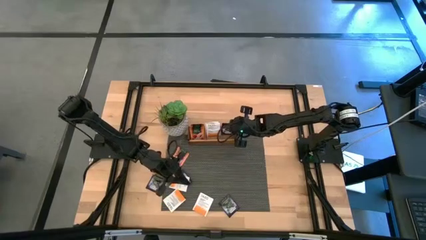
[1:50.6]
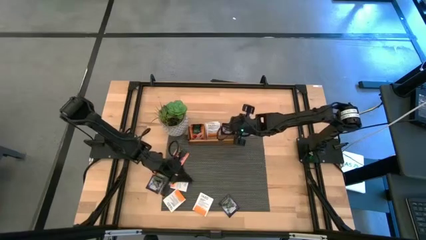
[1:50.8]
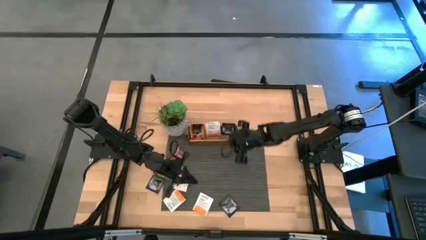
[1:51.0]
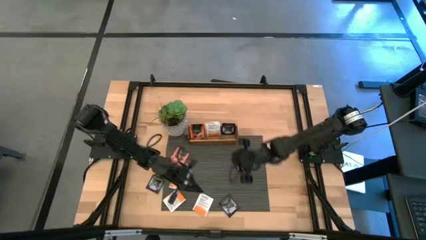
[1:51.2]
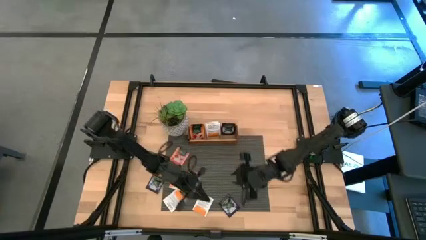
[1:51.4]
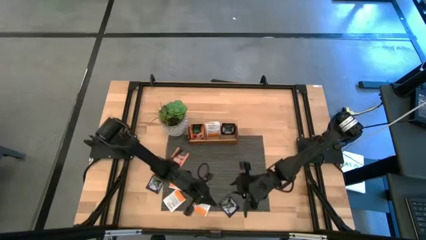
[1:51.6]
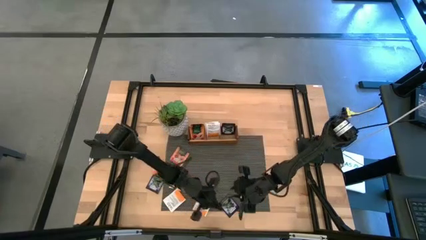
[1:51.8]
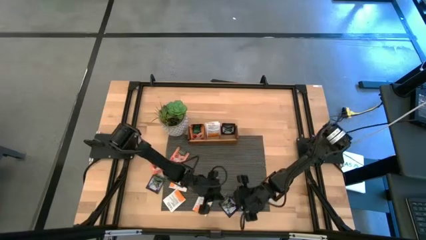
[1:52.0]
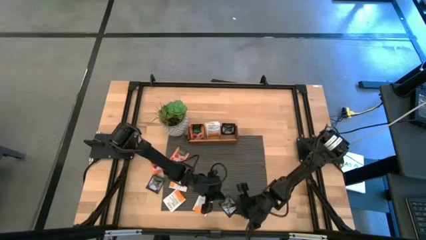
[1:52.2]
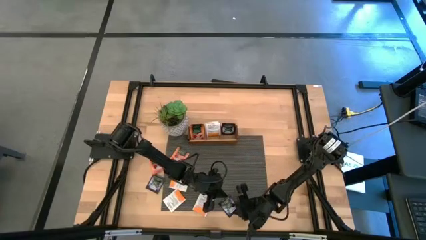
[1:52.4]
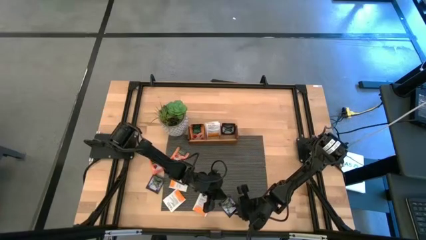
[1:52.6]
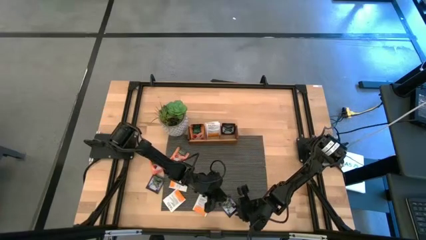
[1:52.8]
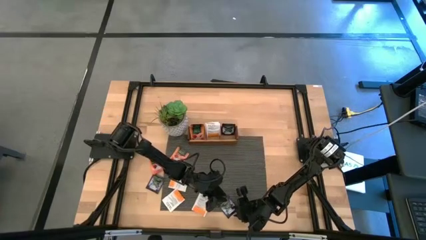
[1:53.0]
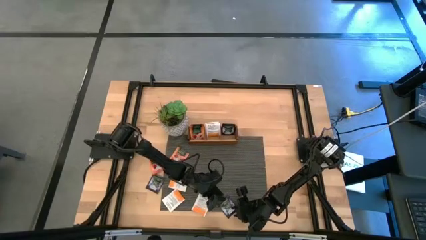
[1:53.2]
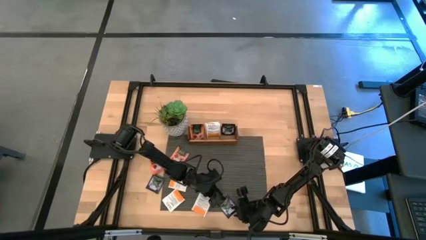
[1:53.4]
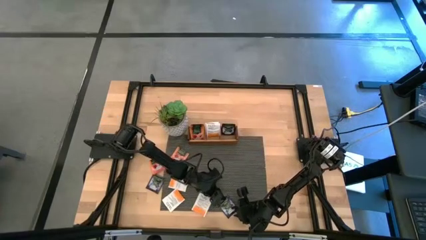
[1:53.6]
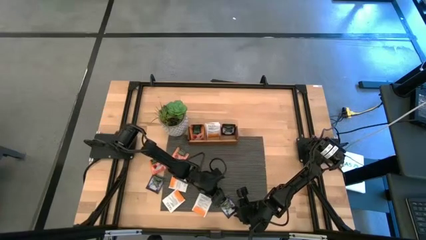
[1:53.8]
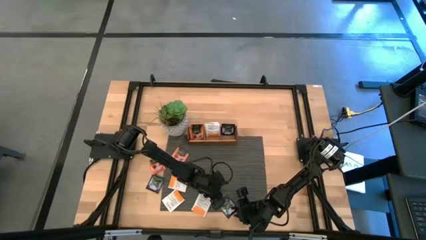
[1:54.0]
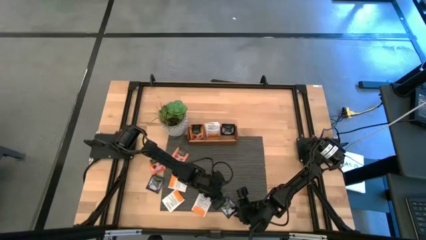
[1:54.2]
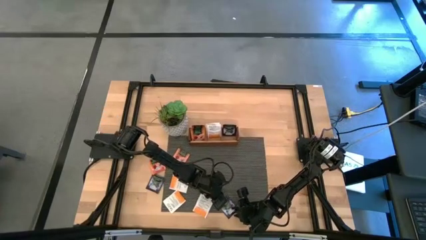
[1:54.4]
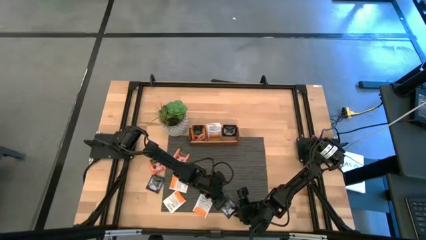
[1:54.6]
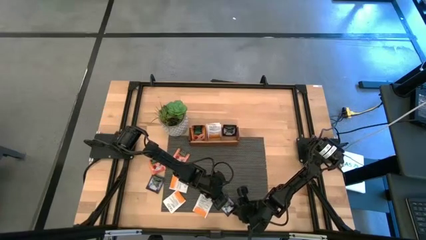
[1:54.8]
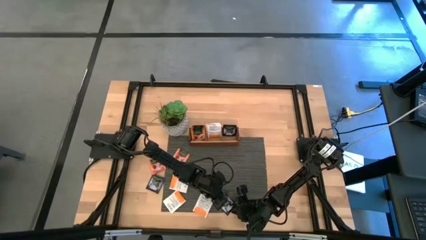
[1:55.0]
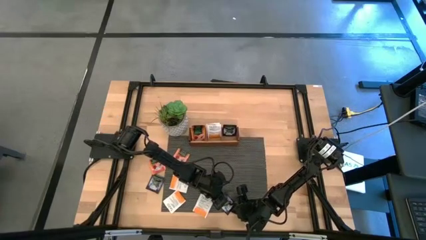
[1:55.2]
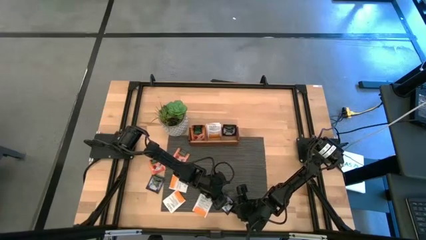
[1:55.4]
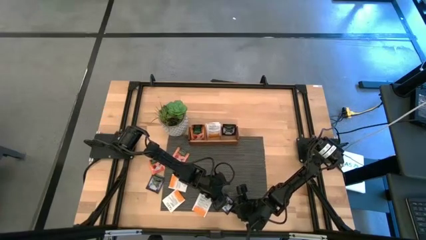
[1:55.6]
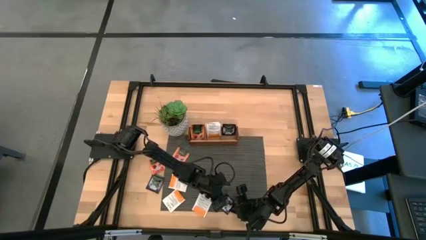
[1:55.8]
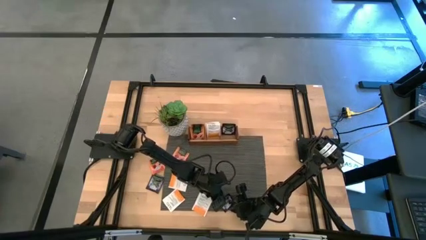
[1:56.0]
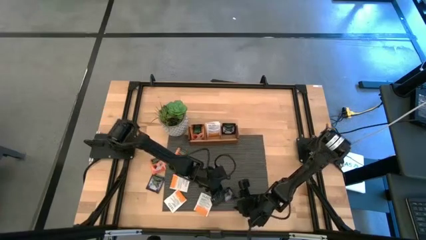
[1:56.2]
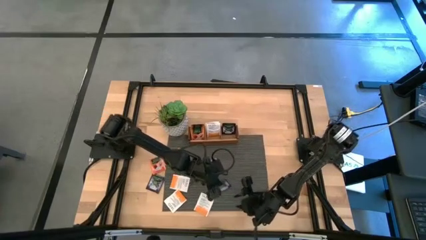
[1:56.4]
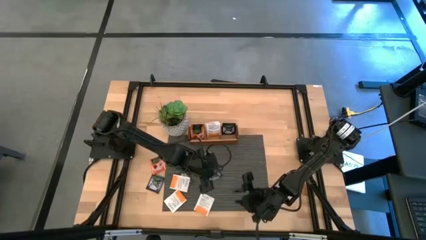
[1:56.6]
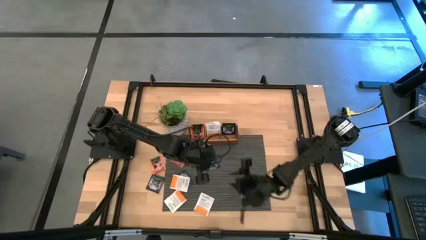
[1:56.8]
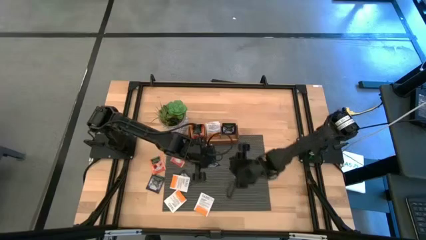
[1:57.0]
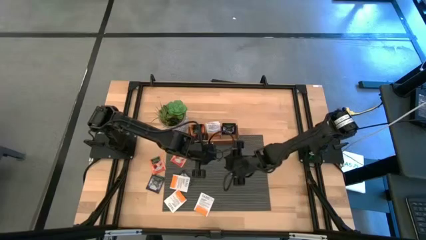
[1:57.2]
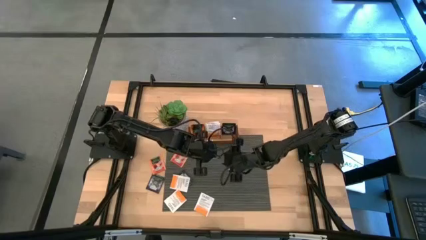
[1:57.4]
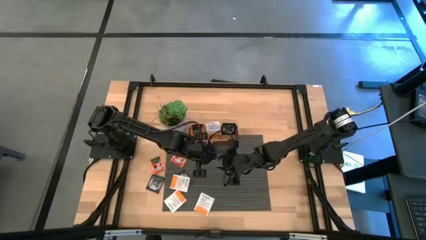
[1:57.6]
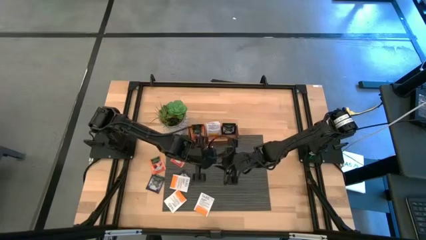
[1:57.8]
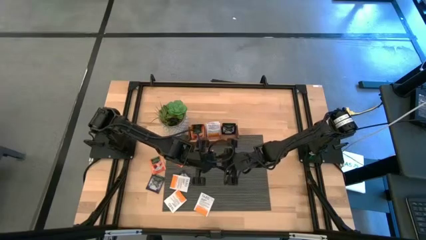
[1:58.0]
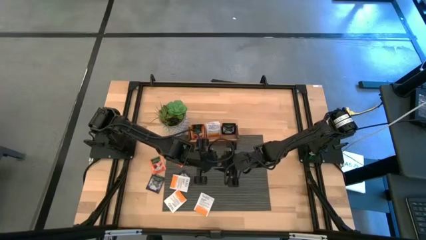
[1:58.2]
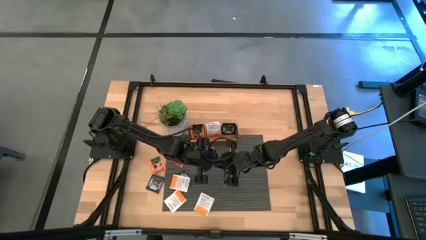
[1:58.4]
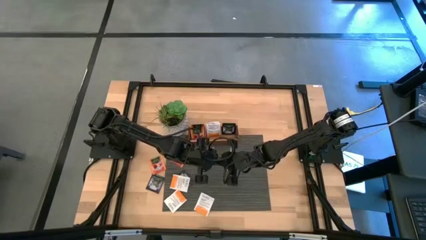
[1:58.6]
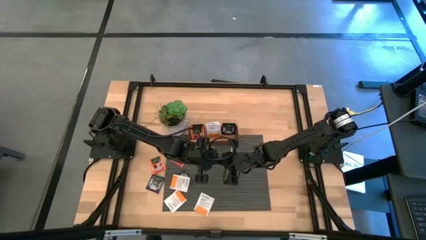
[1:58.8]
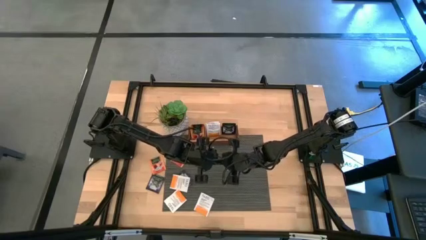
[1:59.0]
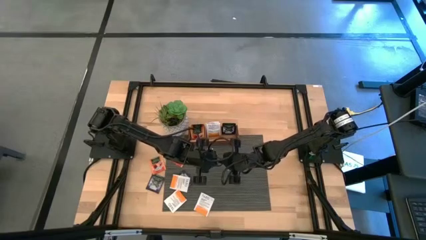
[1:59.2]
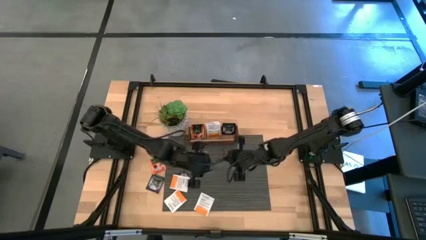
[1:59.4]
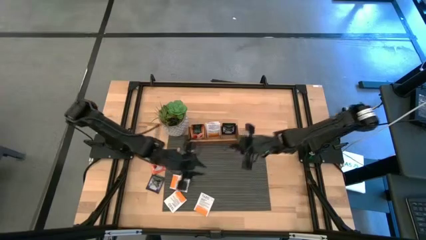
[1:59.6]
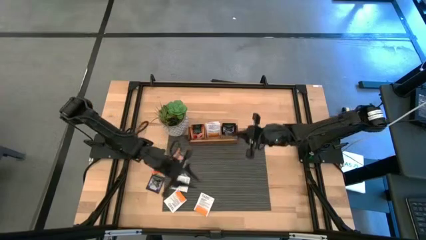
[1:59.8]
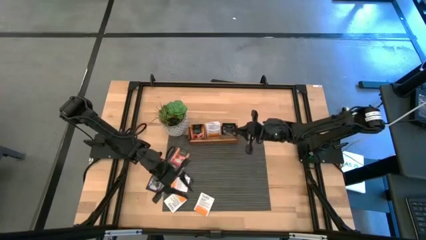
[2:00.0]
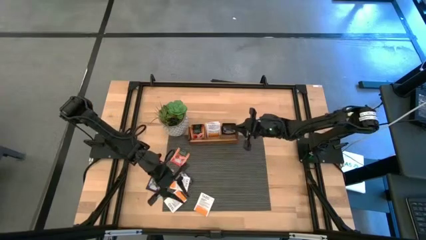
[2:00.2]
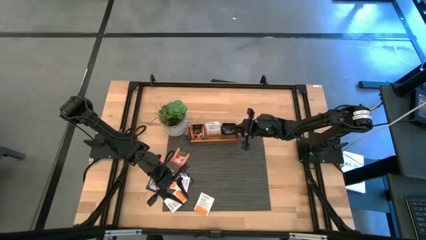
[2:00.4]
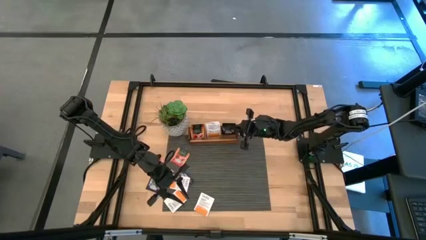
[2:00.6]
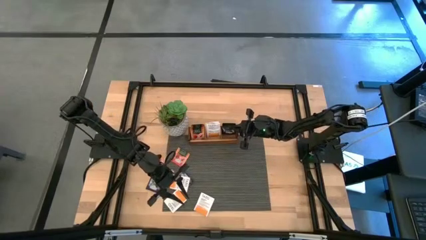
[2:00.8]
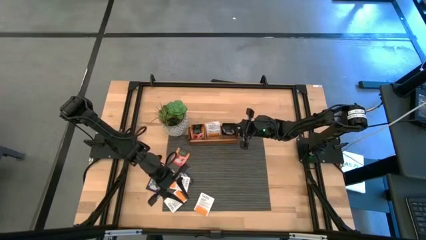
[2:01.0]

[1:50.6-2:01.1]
Task: Pick & Place Tea
Put the right black tea bag into the right slot of the wooden organizer

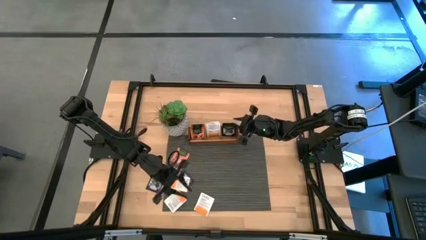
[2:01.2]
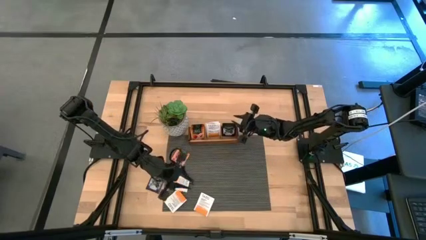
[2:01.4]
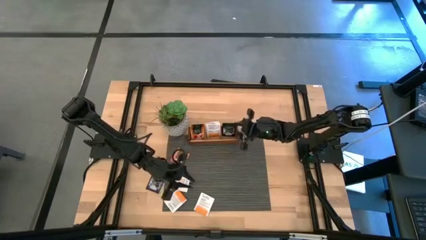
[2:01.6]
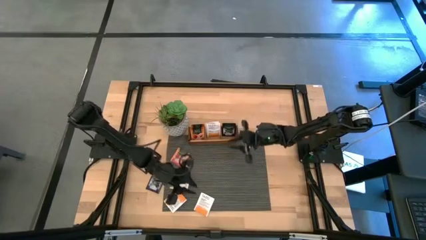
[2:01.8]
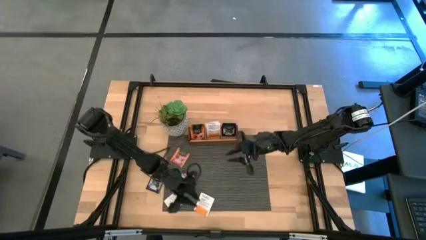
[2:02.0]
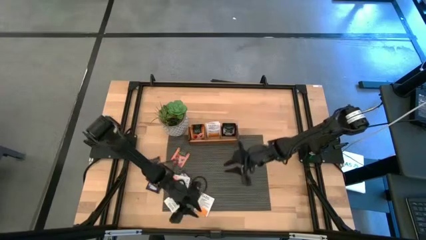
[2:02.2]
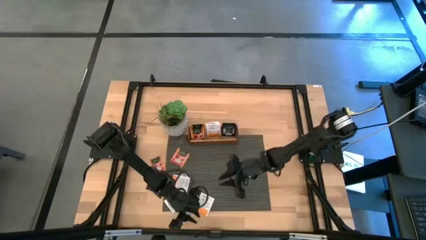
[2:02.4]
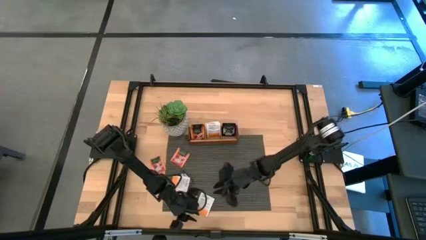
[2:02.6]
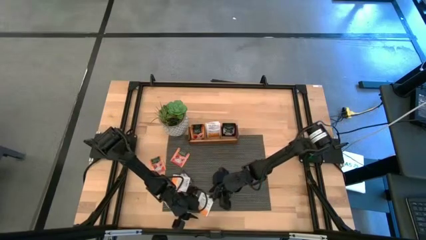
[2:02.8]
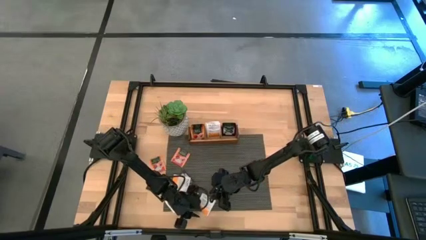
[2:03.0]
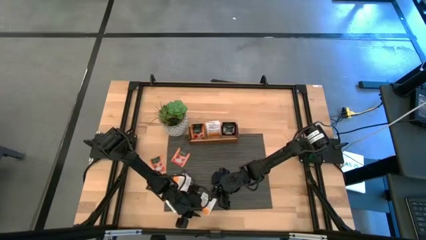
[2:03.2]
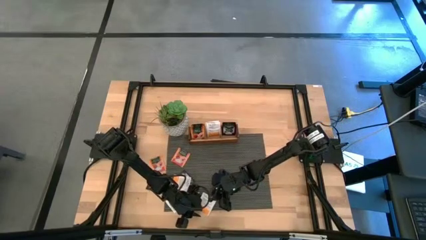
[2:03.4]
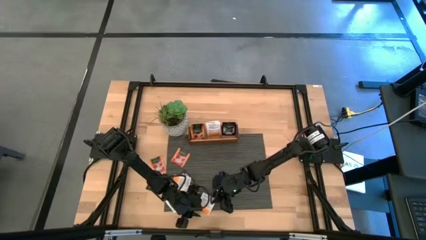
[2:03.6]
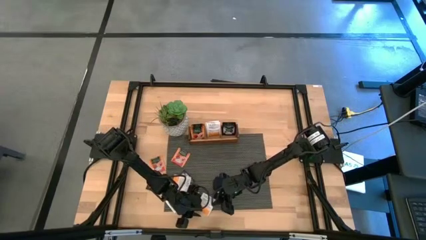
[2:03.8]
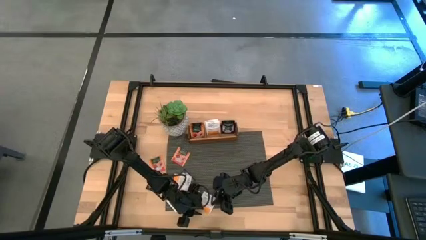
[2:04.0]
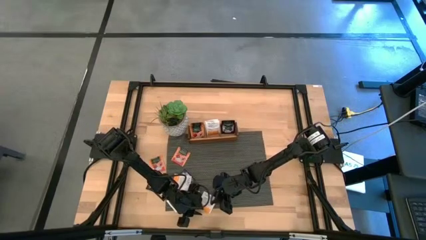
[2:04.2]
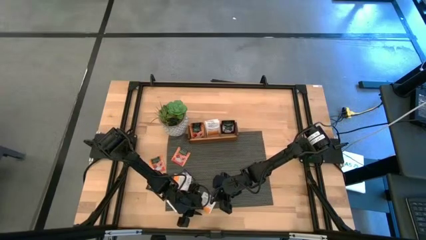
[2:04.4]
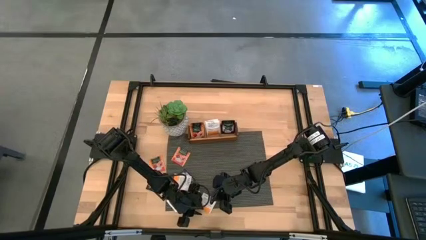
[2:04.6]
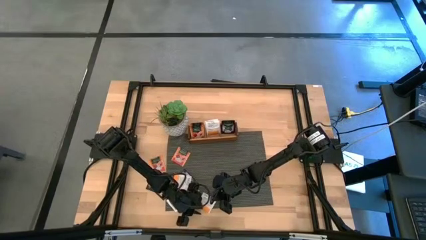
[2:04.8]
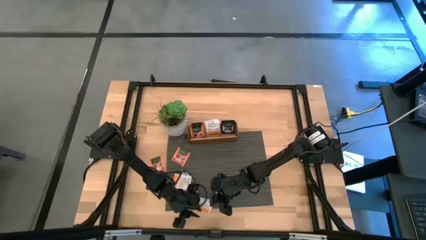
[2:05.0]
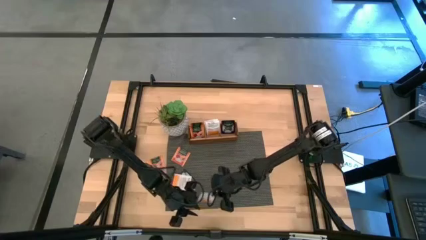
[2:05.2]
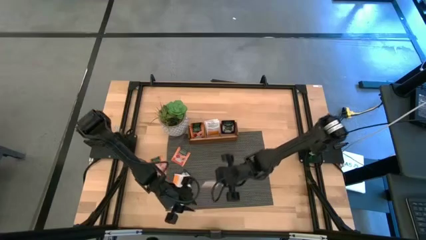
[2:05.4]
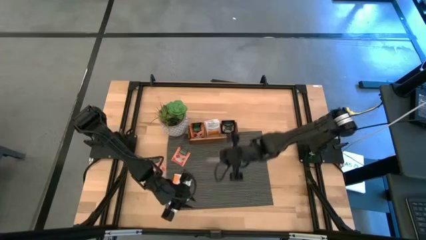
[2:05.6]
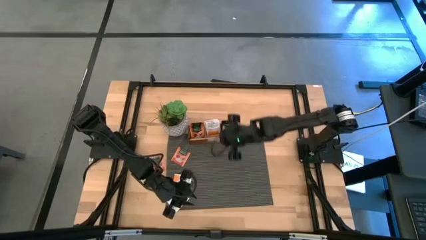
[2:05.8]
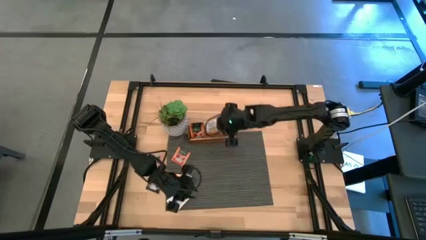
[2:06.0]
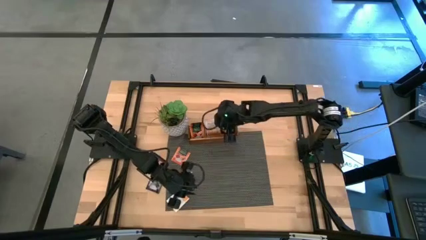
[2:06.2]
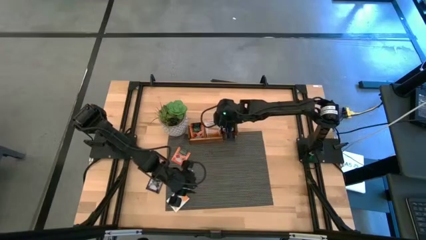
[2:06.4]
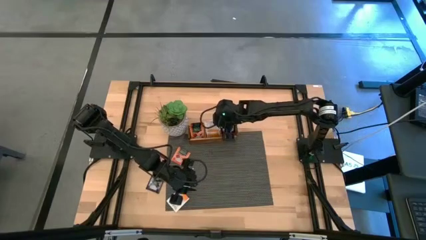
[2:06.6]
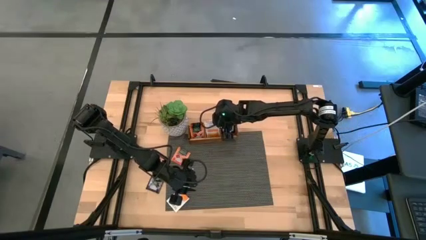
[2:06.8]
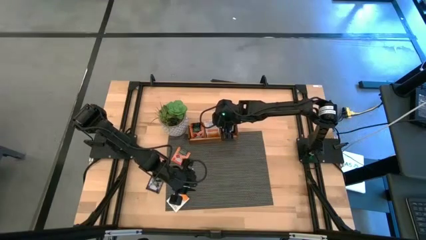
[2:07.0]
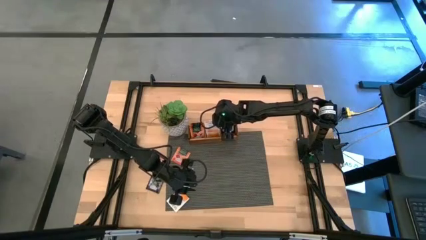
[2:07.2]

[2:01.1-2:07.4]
Put the right white tea bag into the middle slot of the wooden organizer

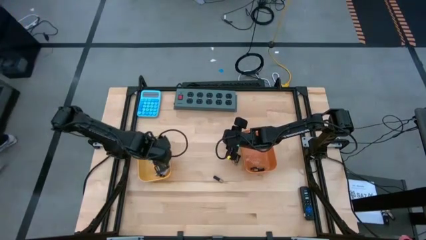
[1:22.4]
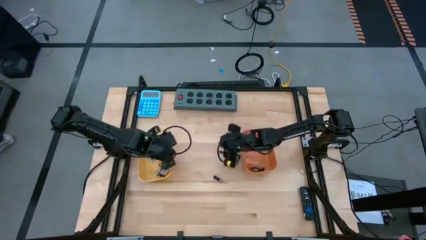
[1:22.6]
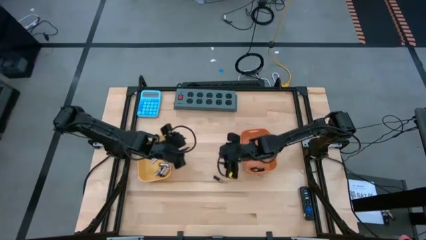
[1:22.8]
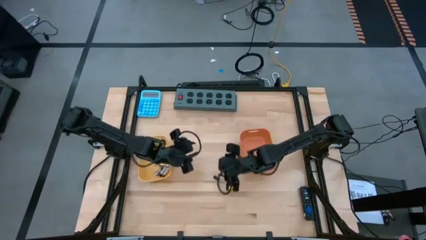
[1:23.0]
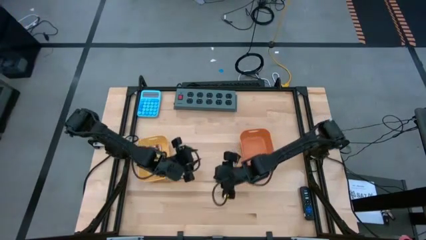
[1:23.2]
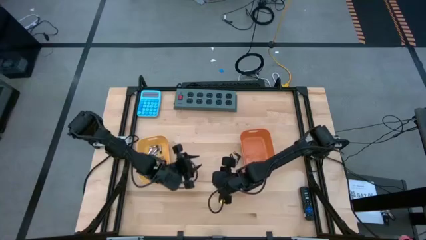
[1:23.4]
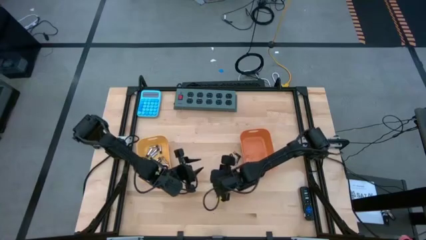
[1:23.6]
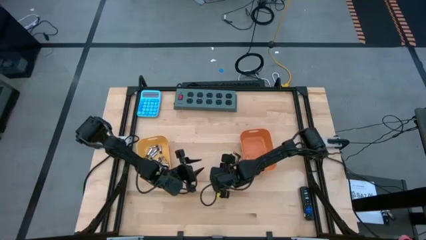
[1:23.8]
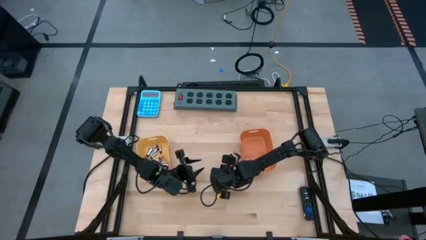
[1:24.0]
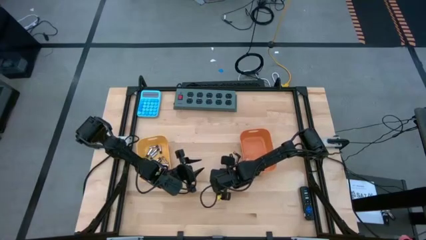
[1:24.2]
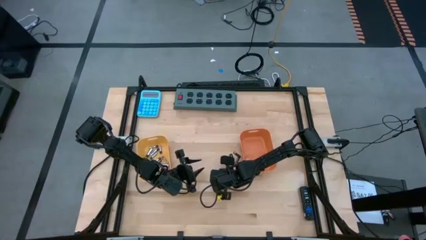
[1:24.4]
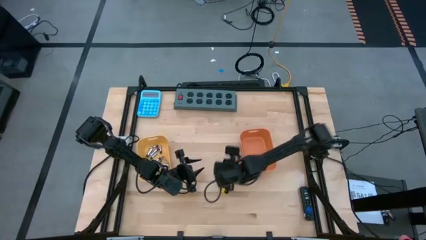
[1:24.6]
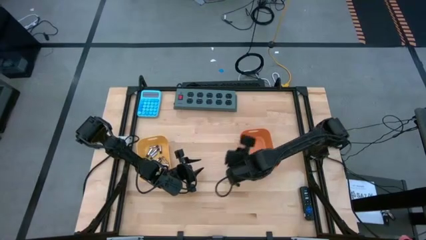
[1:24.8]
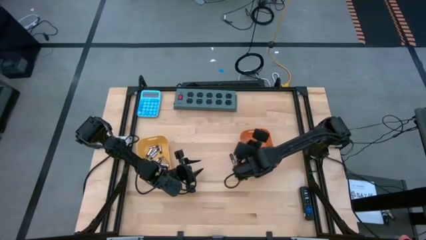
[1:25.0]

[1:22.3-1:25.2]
Task: Sort batteries
Put the black battery into the orange bin
